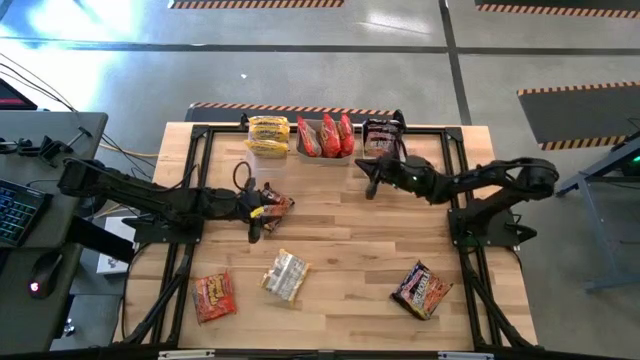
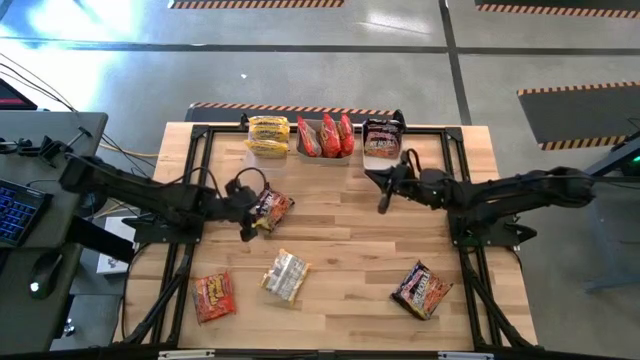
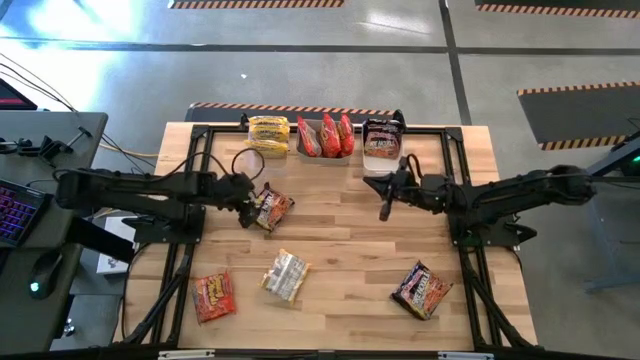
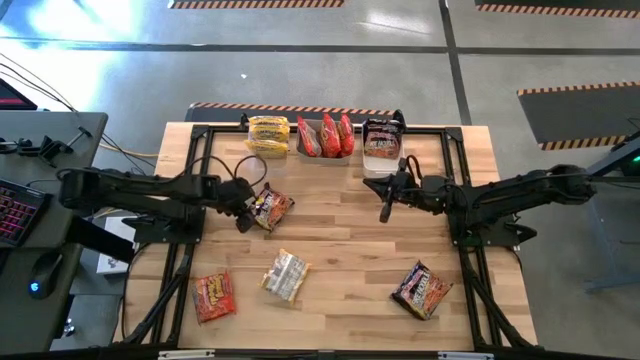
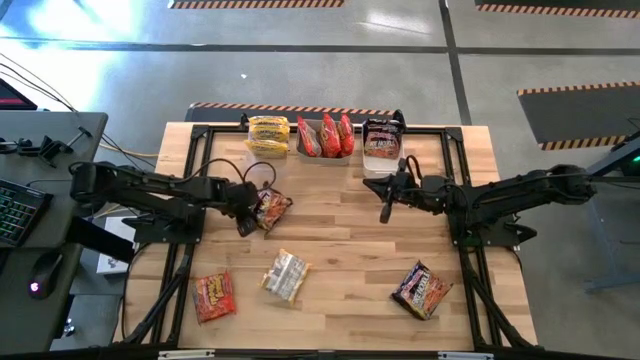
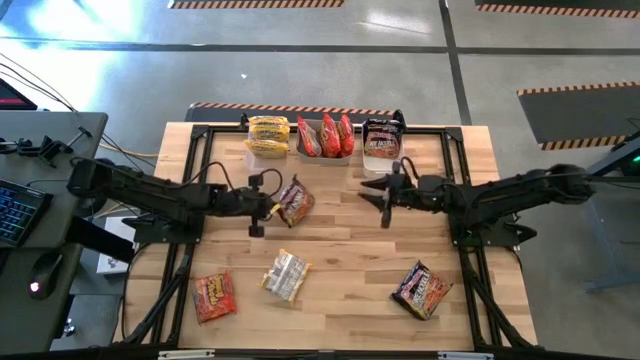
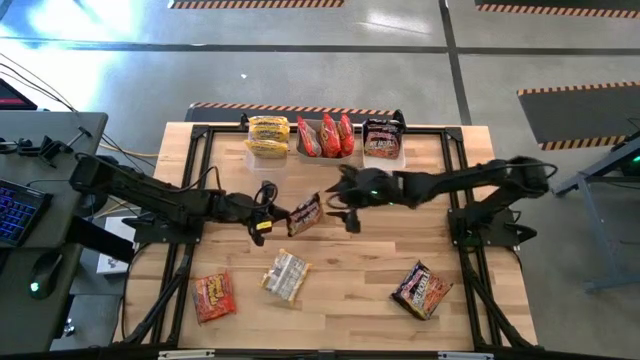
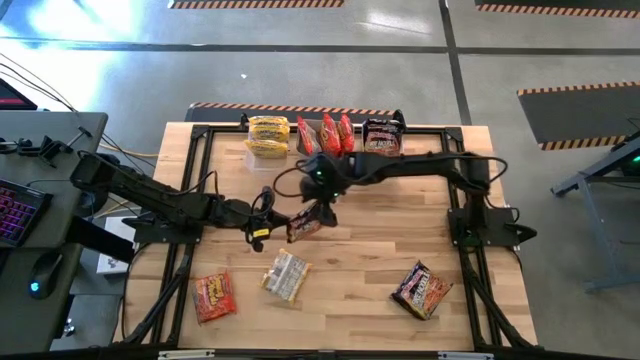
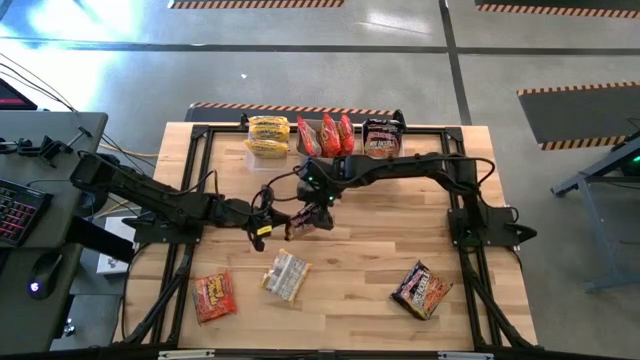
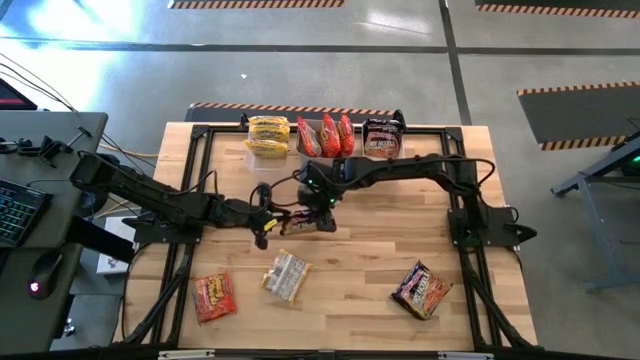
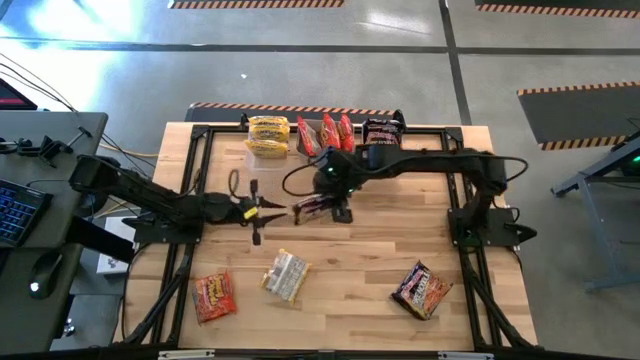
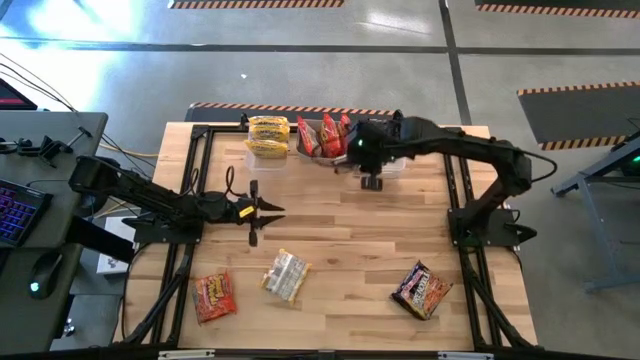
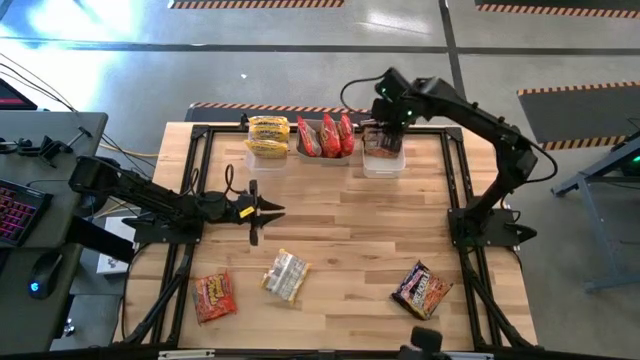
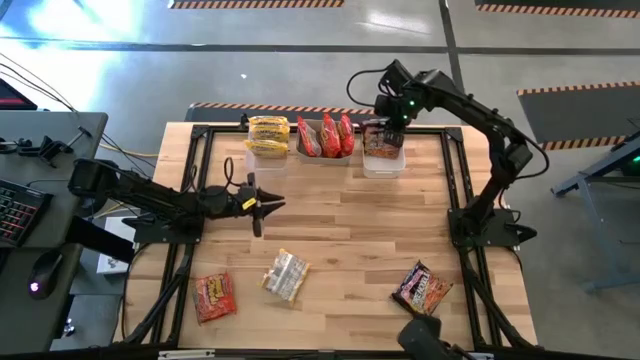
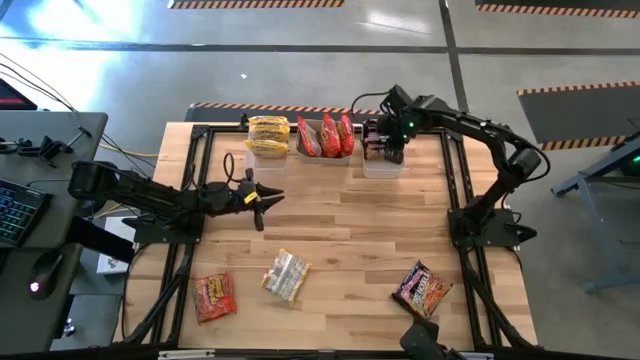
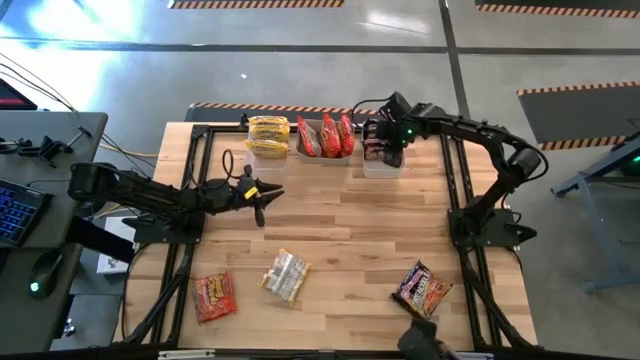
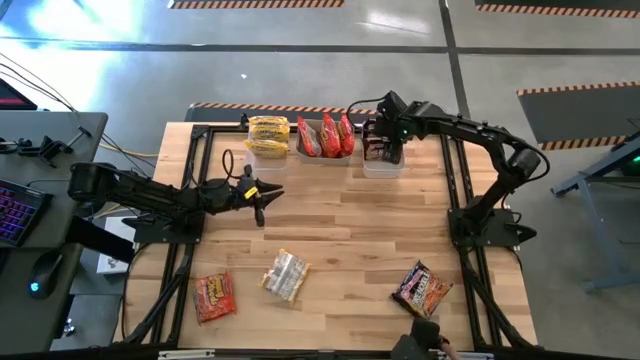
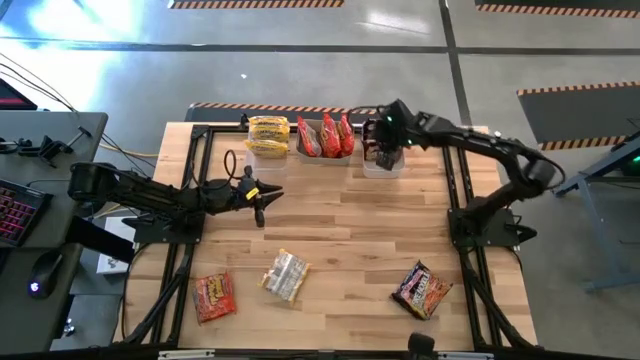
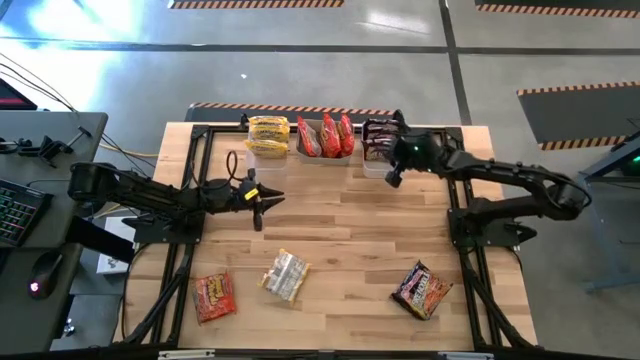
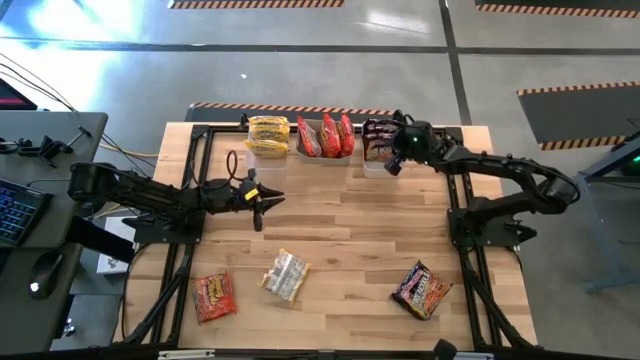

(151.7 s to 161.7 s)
Task: Sort Maruchan noodles
Put the top black noodle pack into the white bin

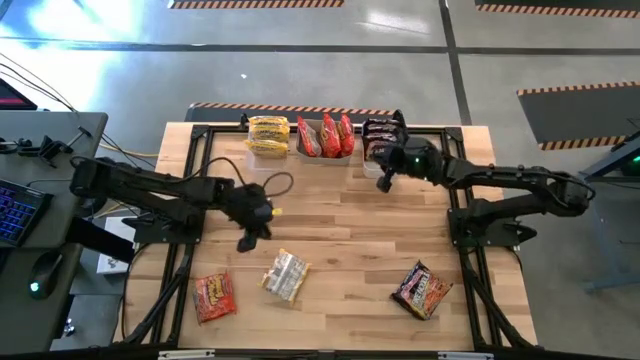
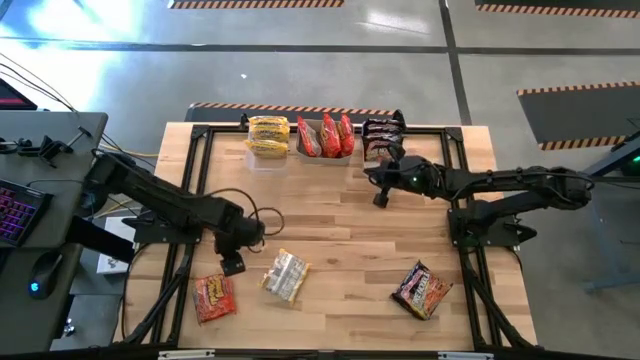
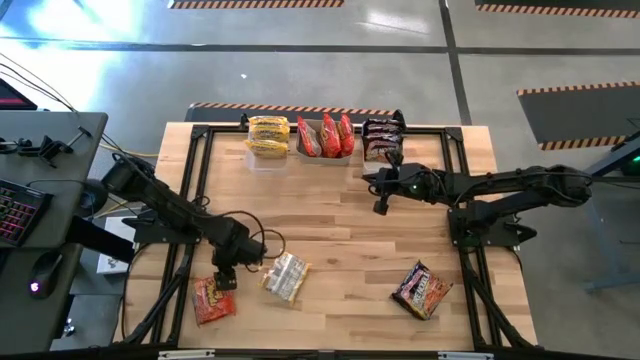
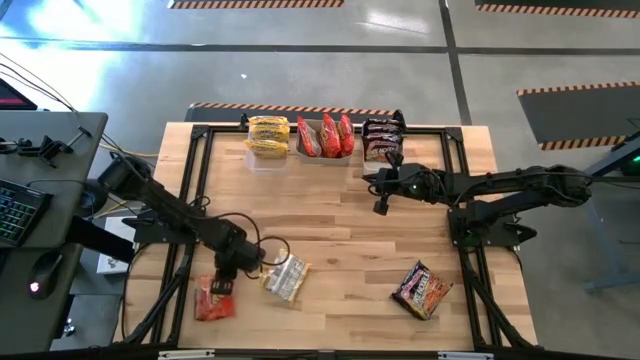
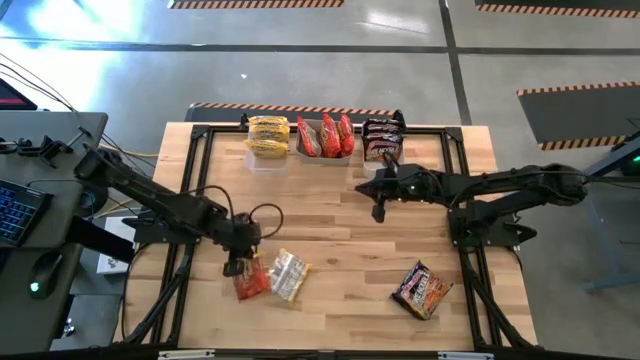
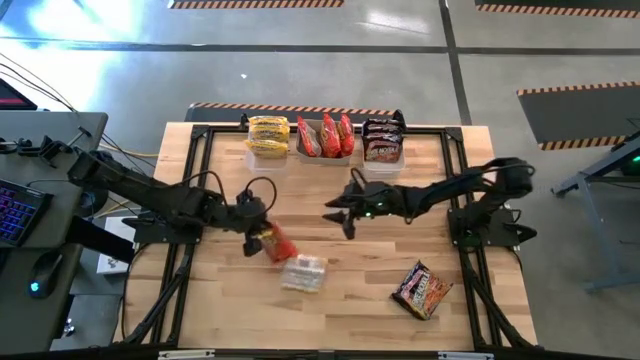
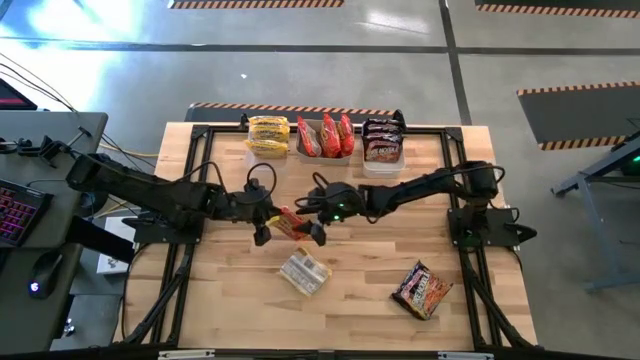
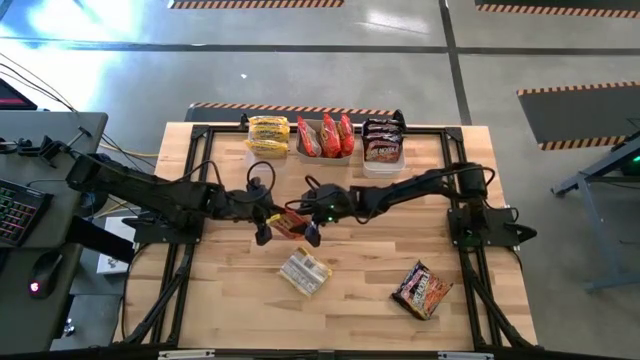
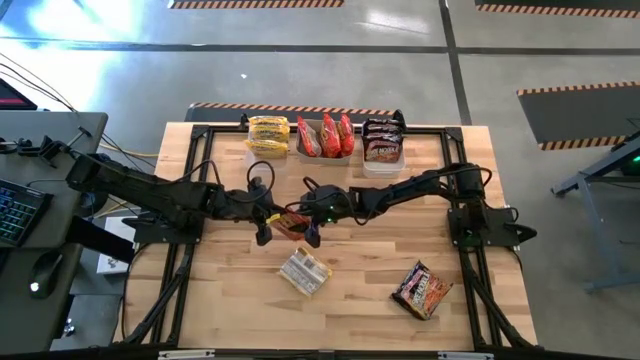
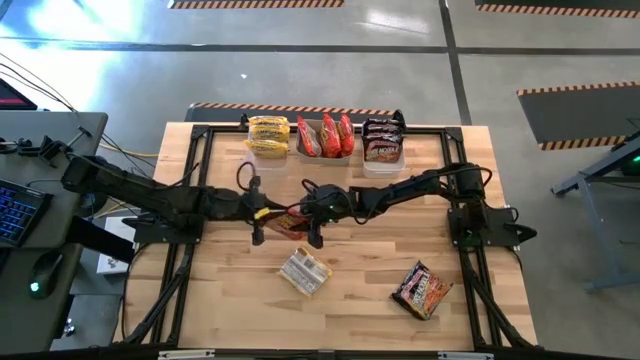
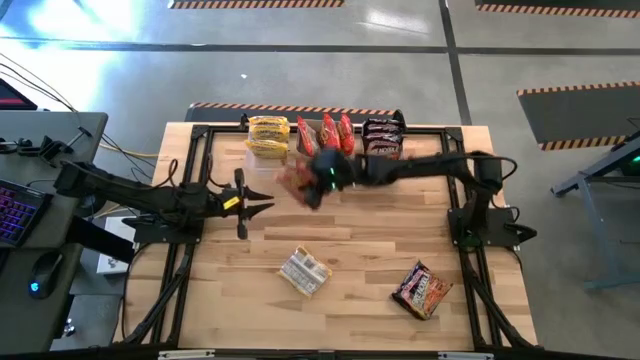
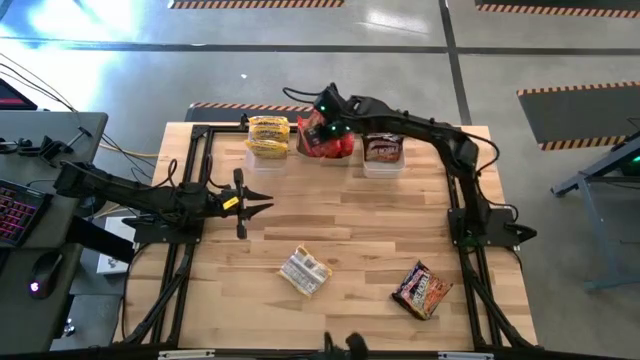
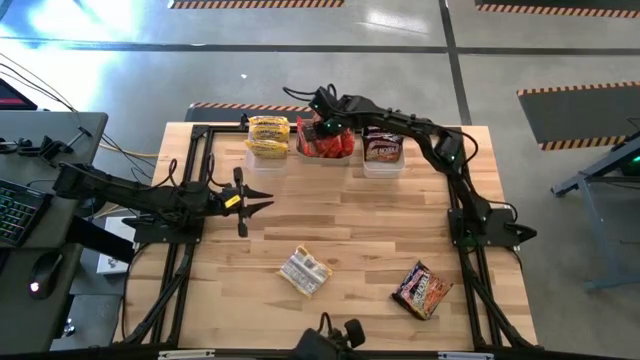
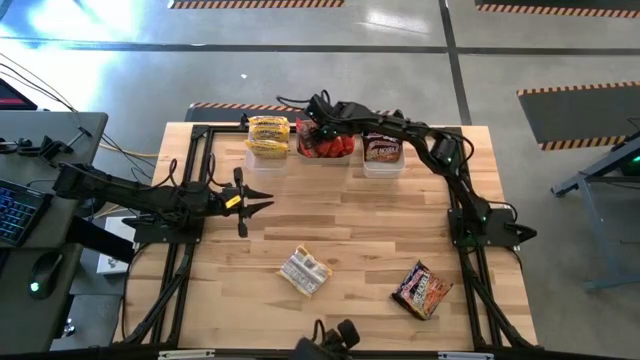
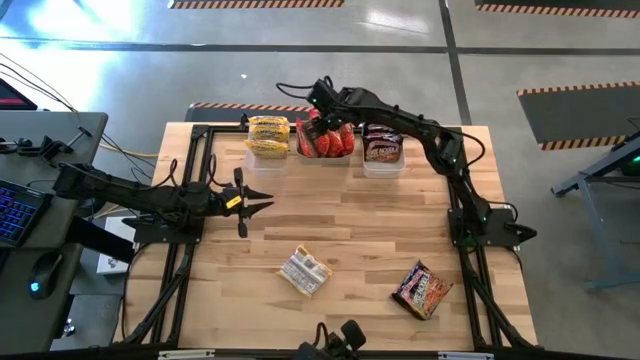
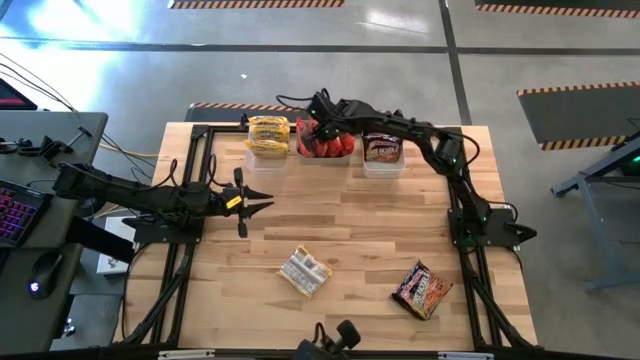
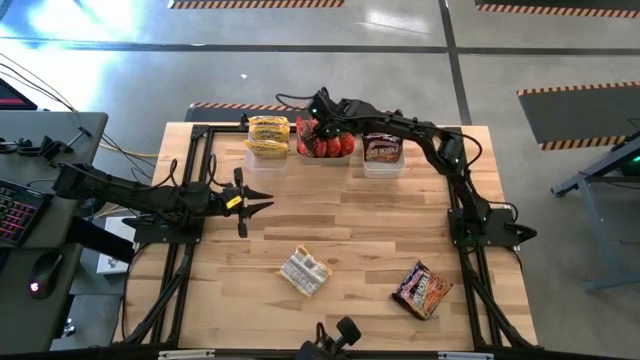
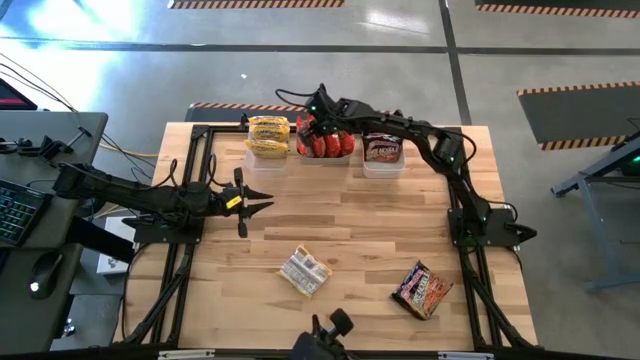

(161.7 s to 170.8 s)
Put the orange noodle pack into the gray bin
